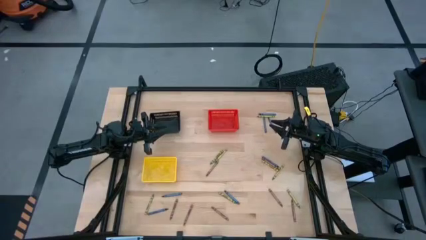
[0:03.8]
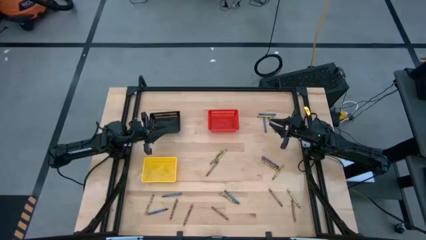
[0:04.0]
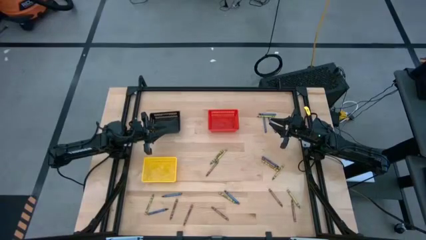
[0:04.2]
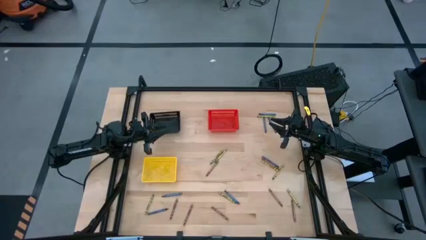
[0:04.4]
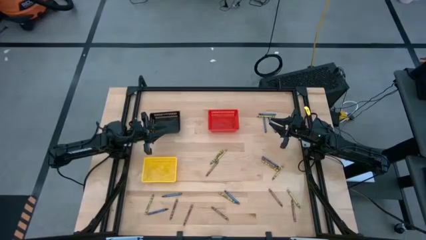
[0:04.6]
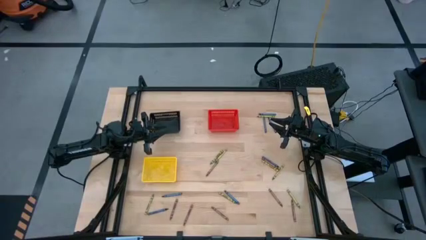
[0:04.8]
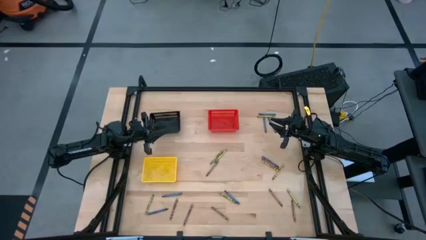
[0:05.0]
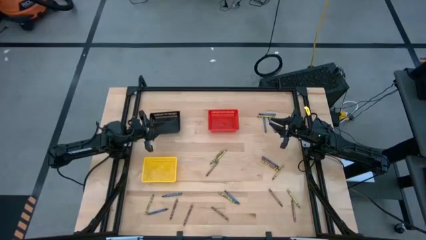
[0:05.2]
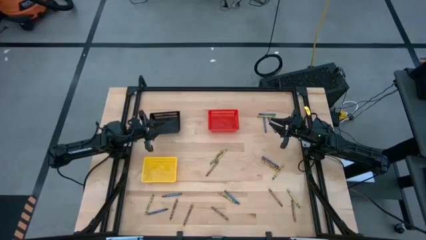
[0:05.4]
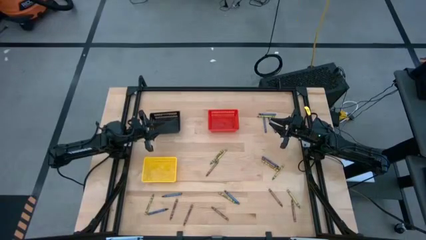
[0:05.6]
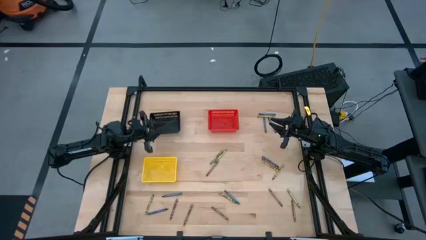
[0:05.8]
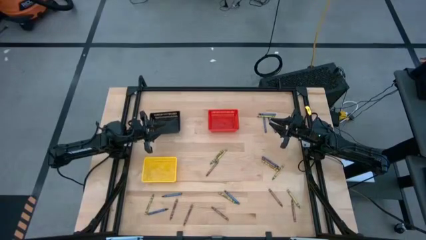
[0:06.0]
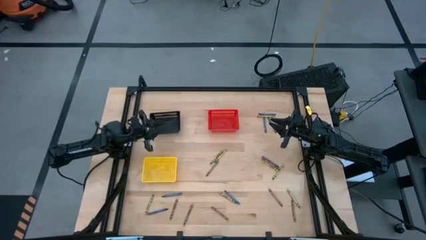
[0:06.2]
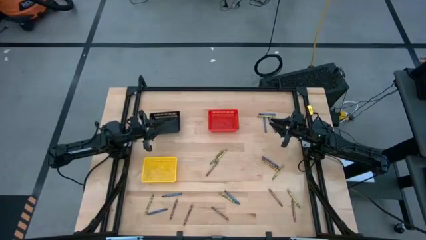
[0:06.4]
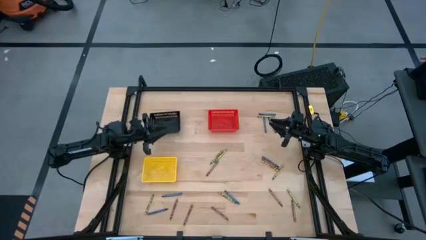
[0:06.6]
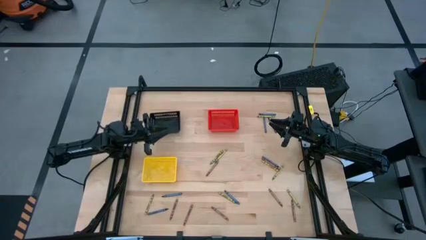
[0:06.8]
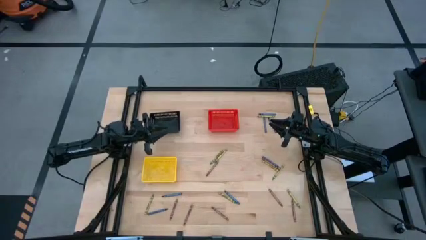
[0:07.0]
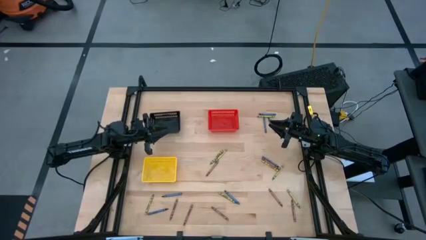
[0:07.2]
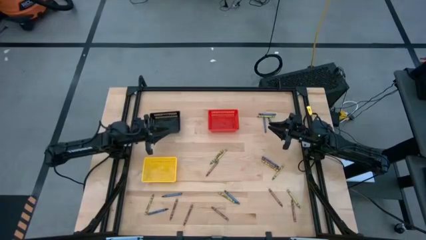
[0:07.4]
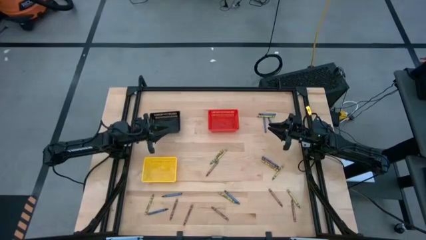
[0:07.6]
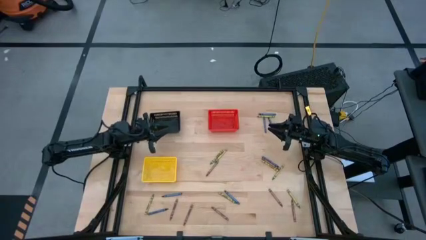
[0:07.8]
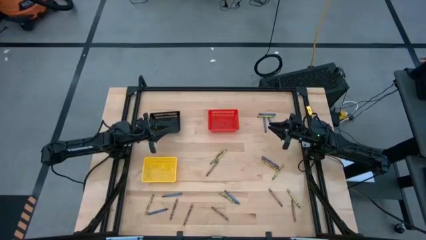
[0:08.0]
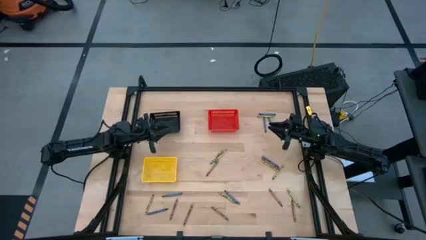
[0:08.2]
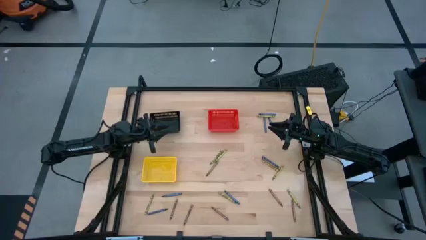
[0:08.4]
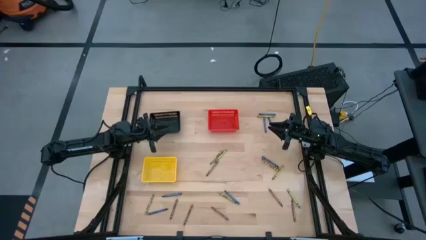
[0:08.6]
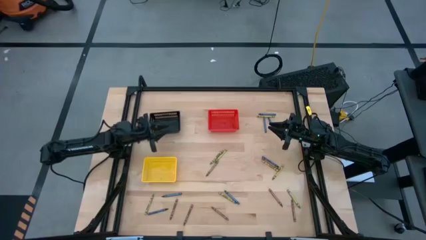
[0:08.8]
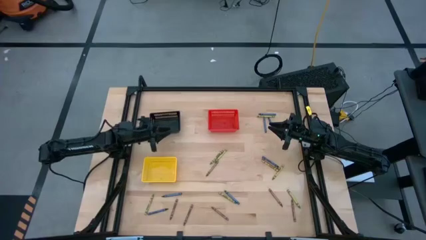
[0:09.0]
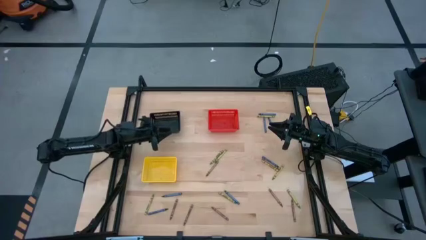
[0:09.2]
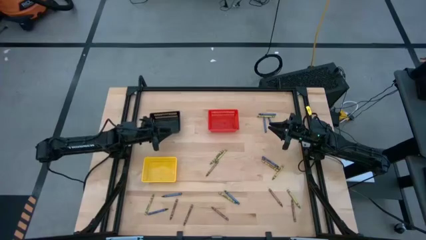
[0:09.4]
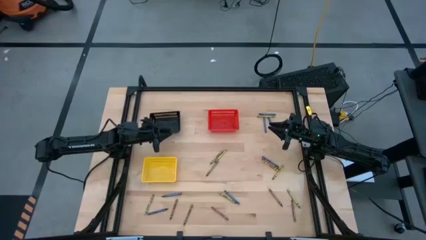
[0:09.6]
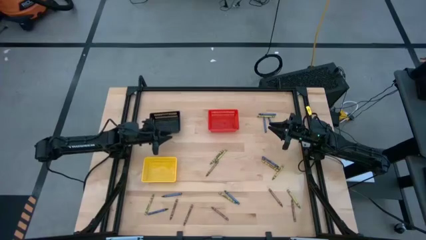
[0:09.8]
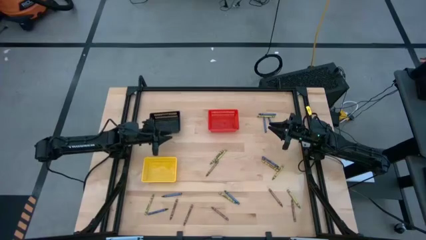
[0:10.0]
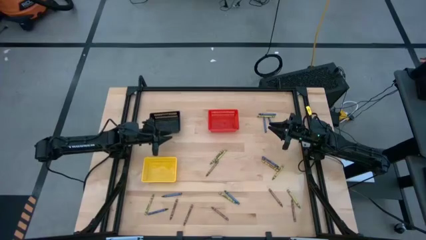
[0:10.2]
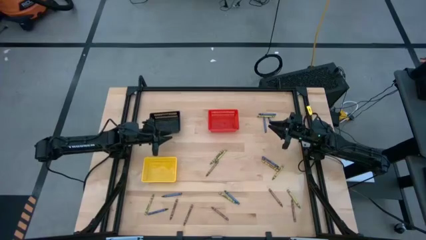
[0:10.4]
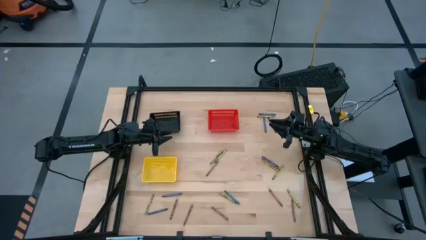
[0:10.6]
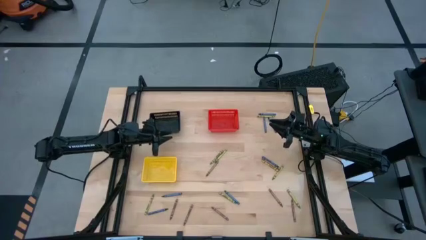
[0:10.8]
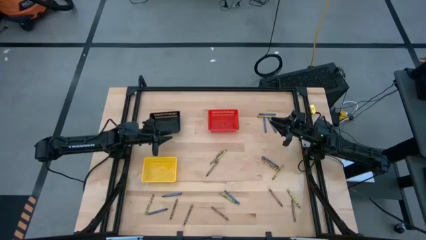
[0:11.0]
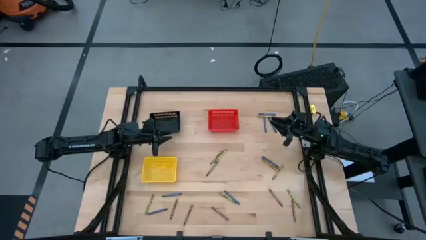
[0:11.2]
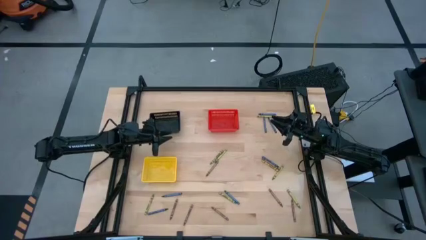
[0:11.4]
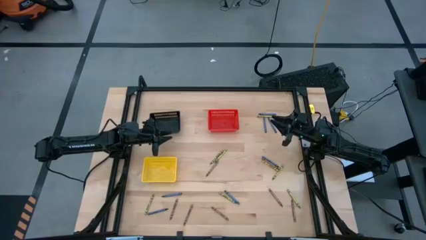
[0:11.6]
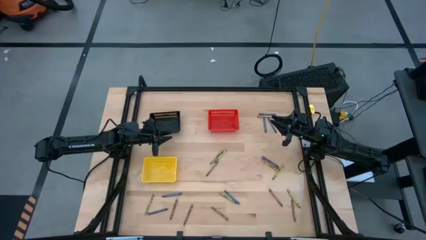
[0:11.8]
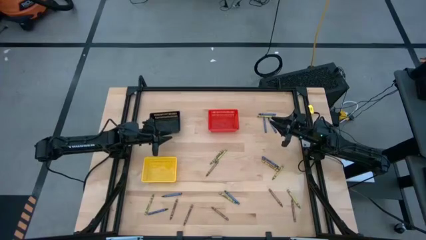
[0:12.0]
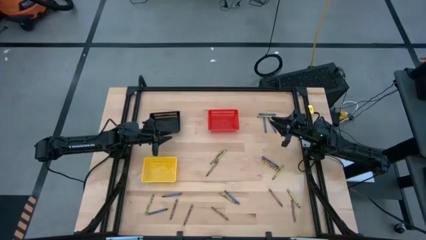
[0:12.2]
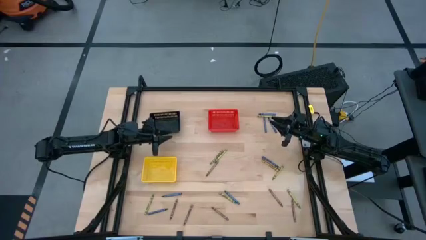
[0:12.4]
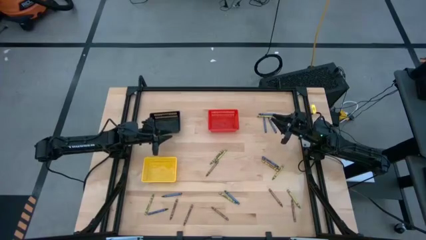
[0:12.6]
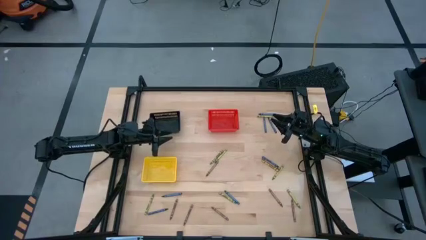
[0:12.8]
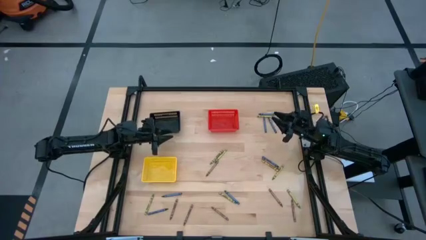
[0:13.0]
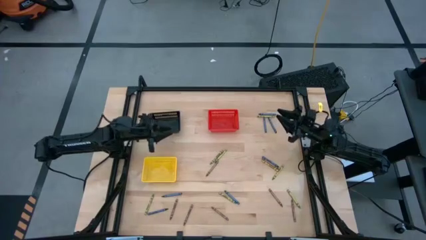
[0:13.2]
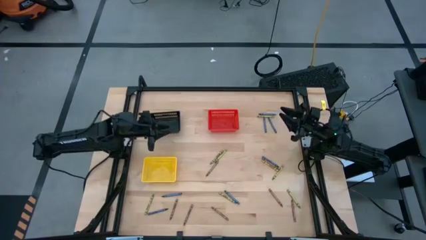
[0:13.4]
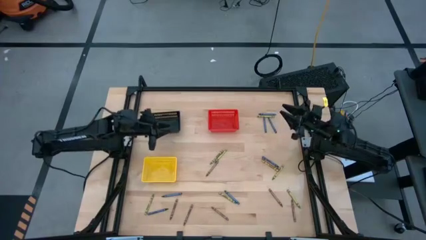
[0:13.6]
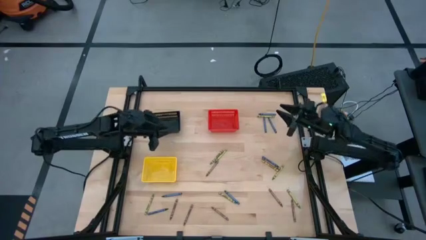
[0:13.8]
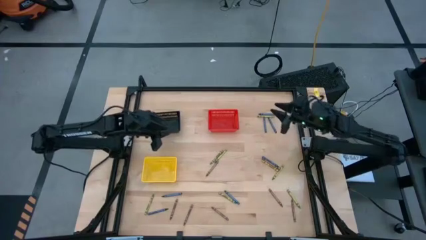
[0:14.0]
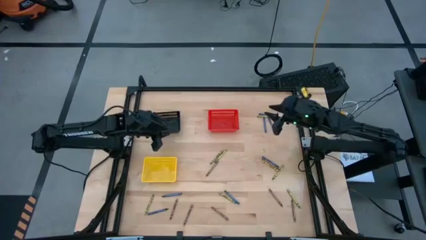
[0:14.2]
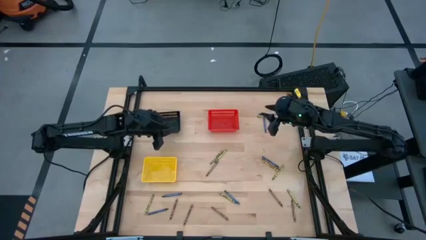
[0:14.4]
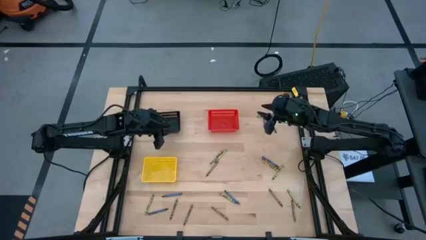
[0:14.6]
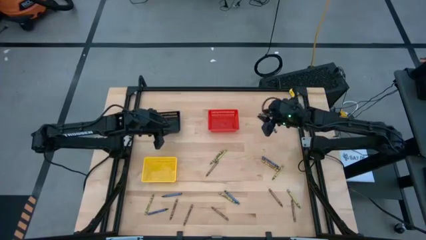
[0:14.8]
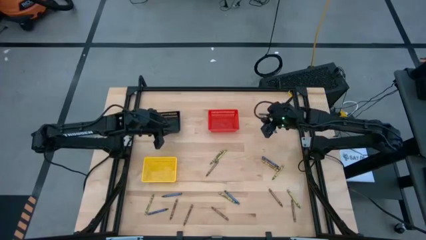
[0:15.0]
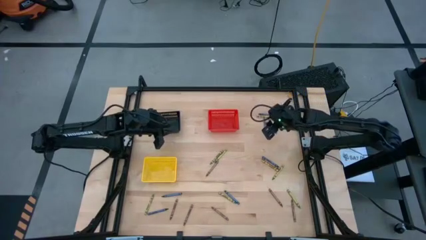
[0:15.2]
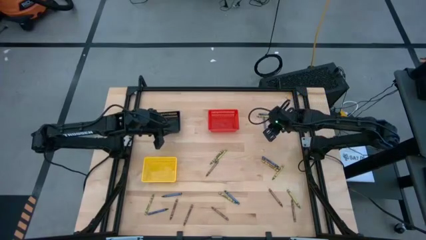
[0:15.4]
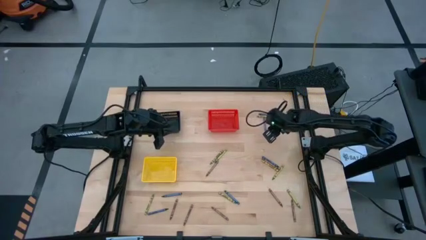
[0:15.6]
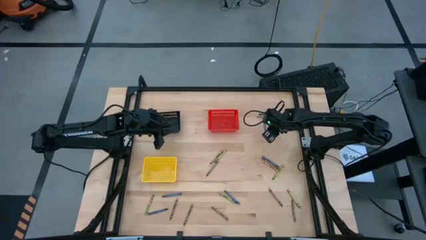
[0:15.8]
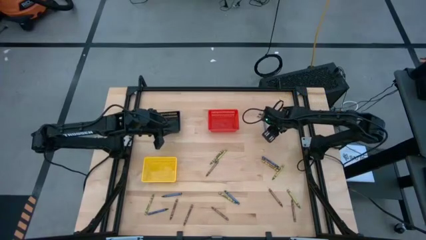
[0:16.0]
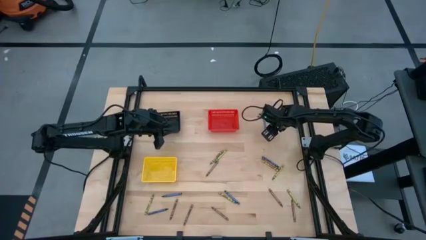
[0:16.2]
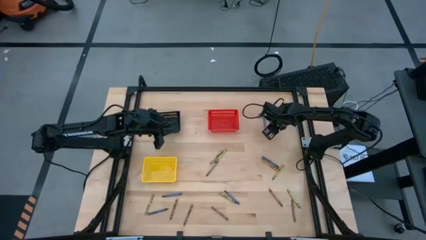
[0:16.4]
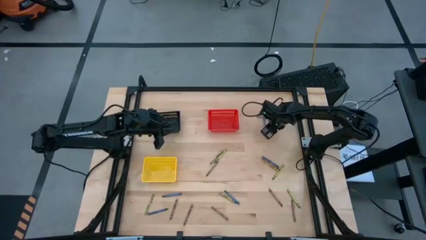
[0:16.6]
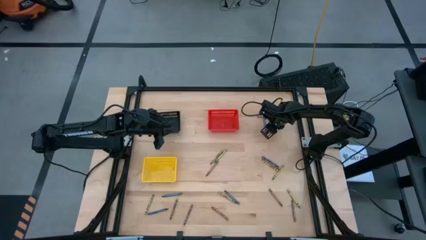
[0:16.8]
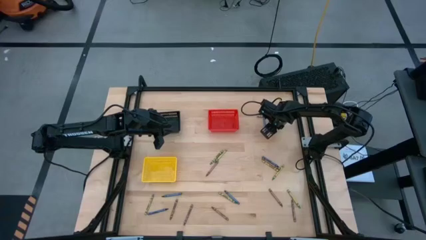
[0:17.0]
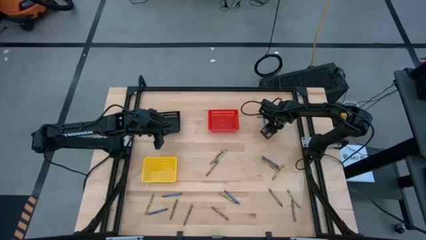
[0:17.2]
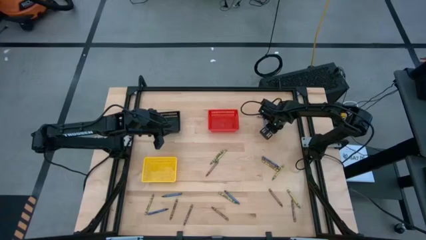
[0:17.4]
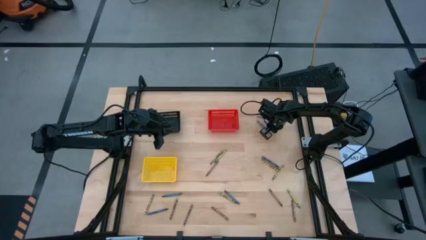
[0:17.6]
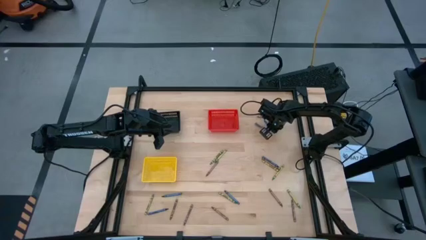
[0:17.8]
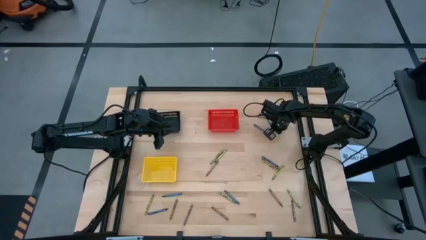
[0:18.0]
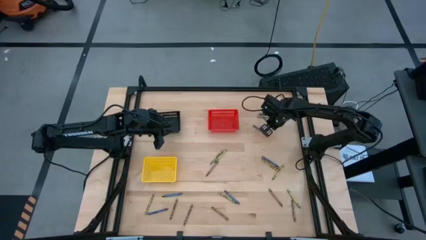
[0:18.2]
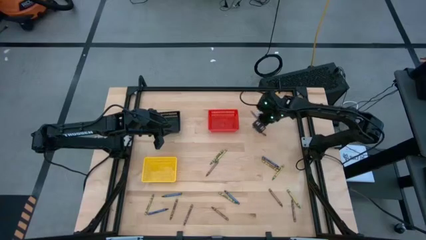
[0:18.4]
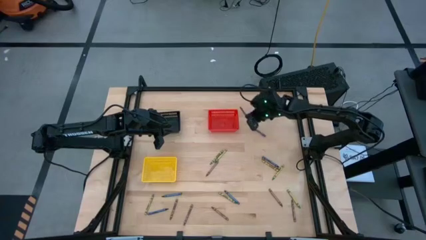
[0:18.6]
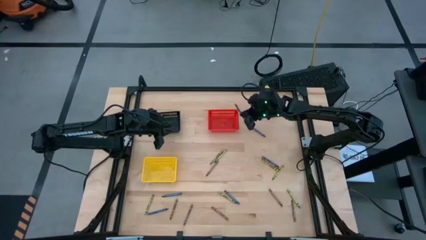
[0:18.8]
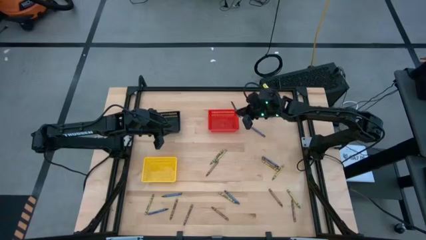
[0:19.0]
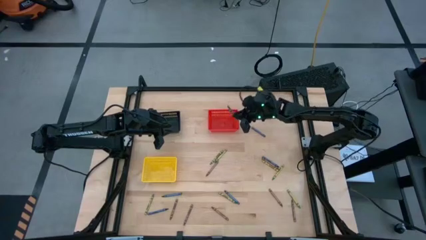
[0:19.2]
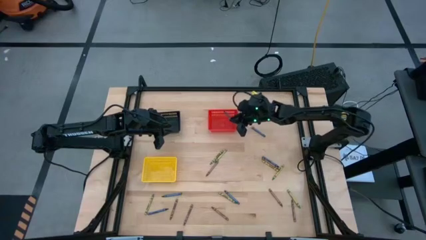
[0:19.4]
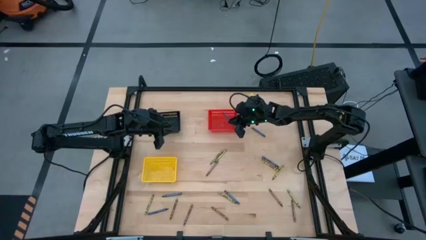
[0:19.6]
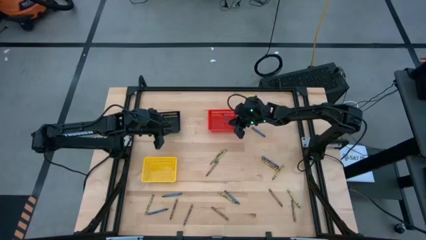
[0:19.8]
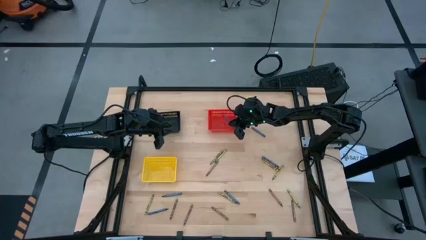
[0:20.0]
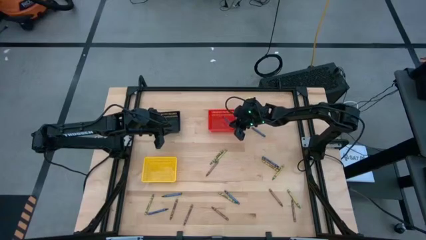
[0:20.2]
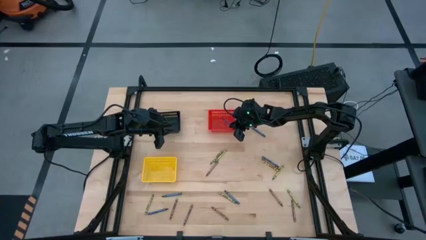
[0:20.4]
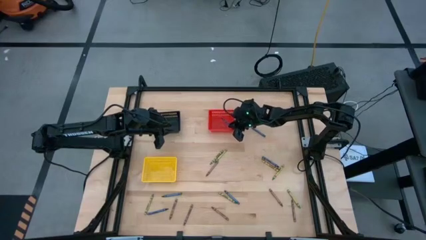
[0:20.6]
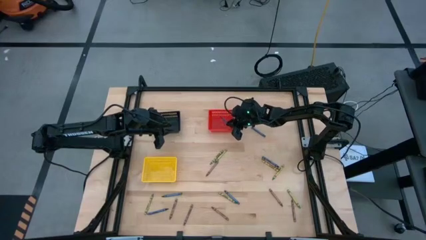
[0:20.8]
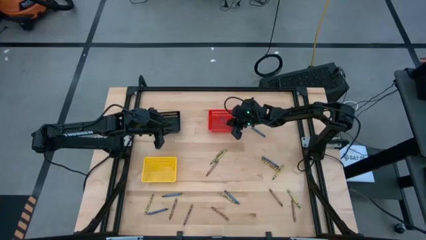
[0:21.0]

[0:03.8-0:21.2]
Task: Sort crayons
Put the blue crayon into the red bin
